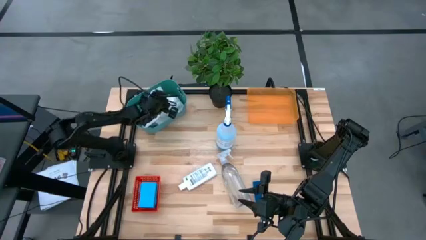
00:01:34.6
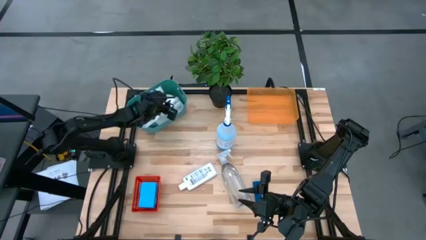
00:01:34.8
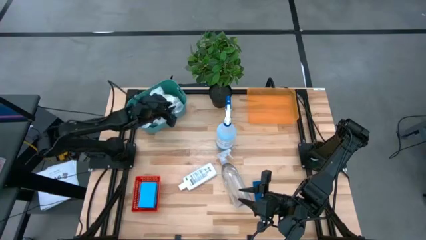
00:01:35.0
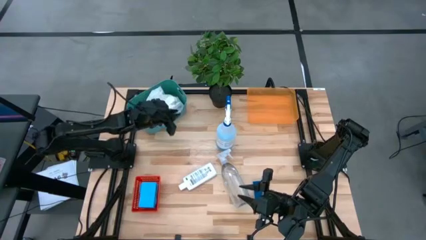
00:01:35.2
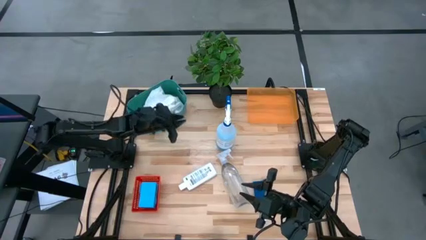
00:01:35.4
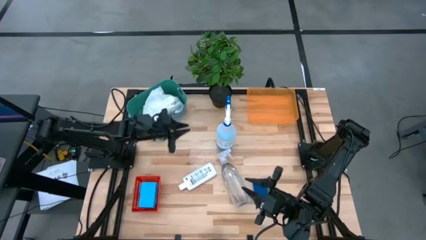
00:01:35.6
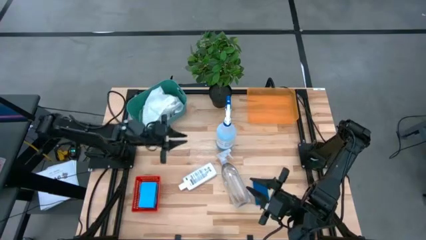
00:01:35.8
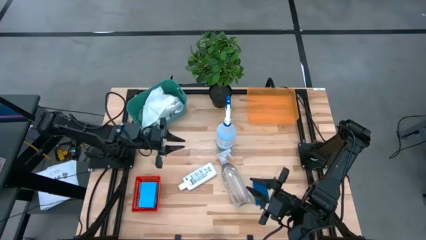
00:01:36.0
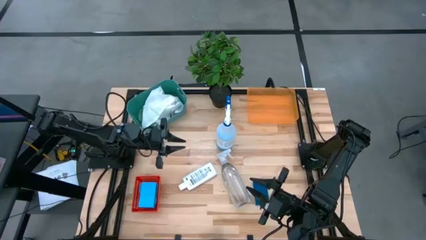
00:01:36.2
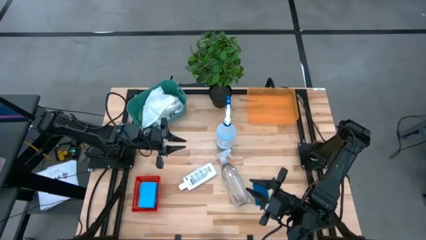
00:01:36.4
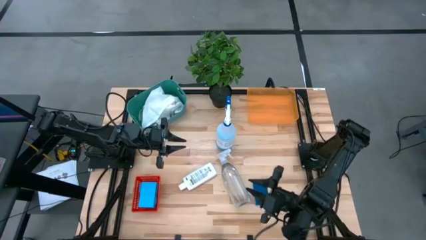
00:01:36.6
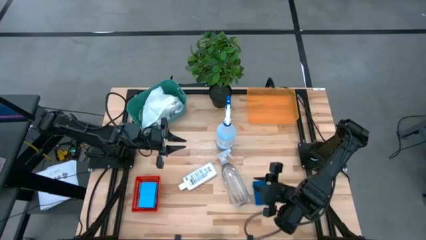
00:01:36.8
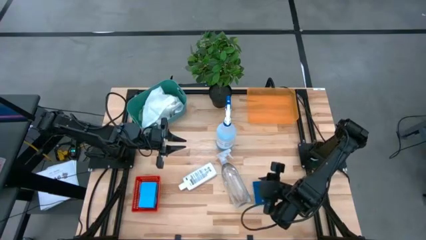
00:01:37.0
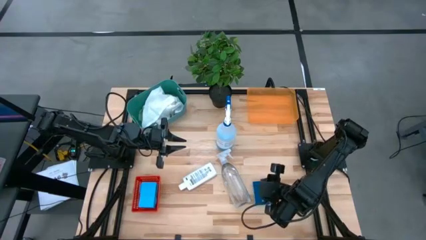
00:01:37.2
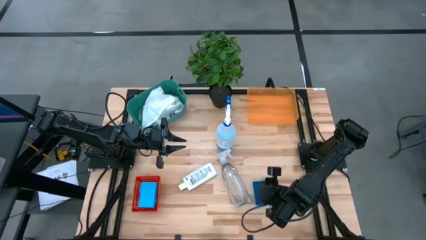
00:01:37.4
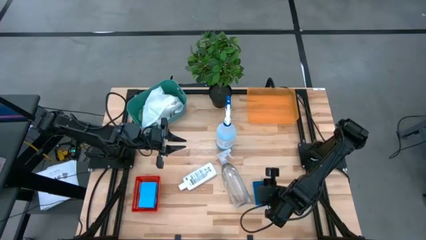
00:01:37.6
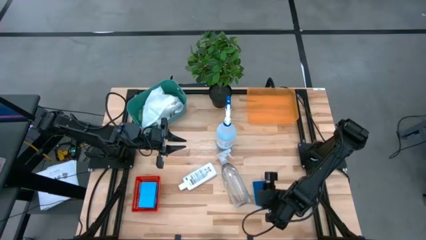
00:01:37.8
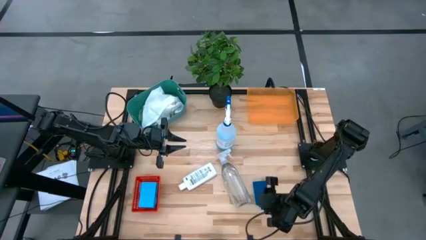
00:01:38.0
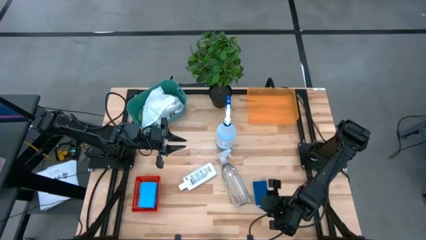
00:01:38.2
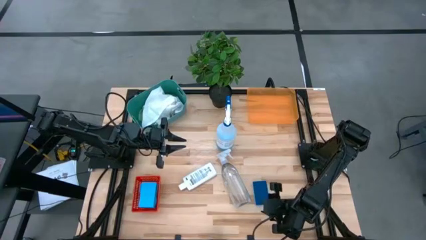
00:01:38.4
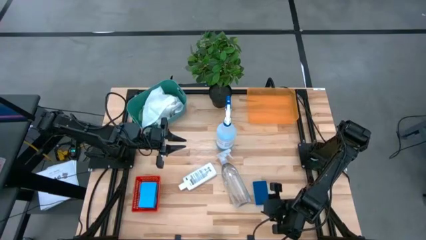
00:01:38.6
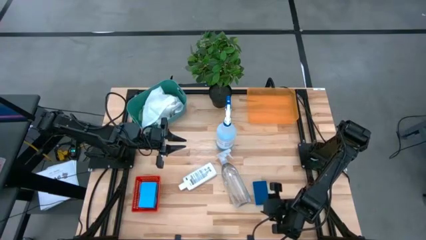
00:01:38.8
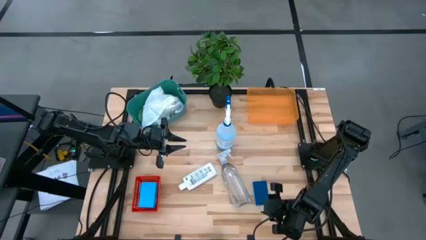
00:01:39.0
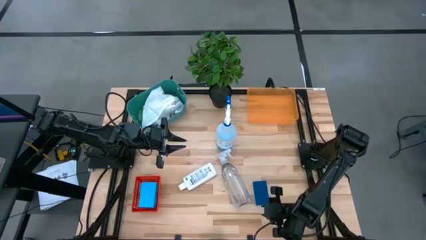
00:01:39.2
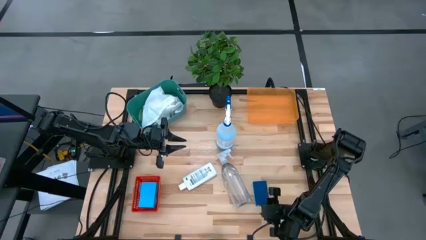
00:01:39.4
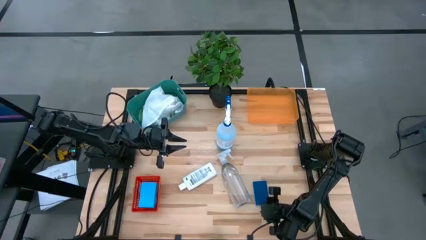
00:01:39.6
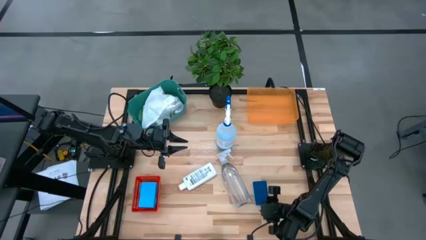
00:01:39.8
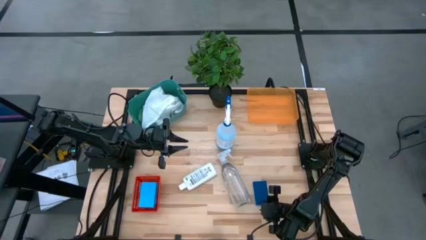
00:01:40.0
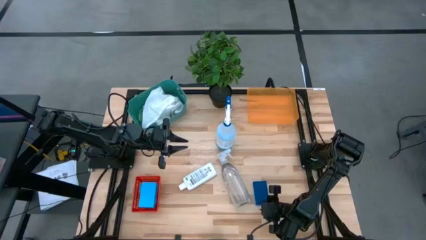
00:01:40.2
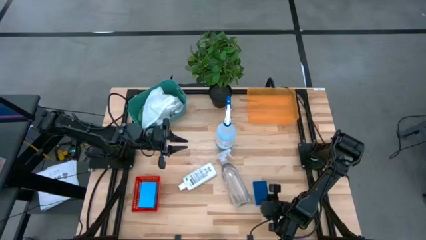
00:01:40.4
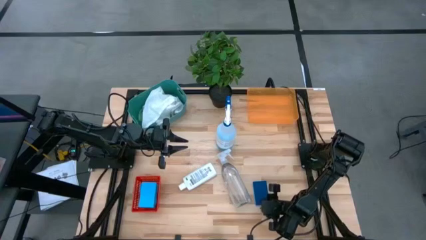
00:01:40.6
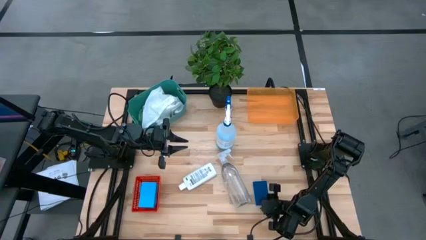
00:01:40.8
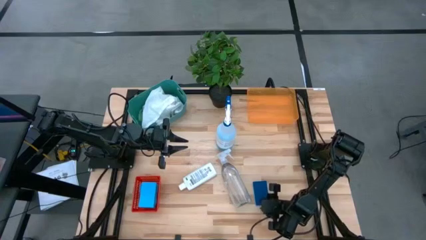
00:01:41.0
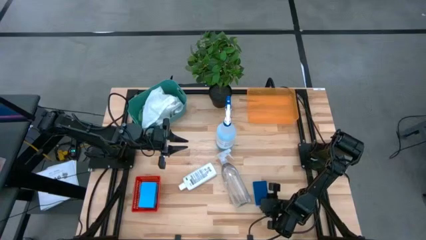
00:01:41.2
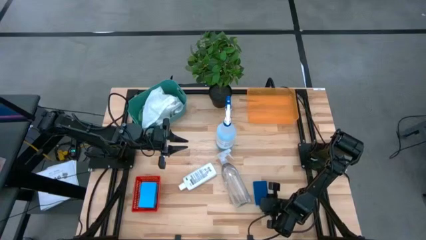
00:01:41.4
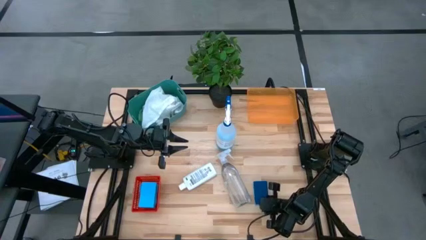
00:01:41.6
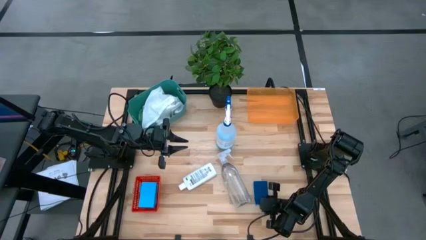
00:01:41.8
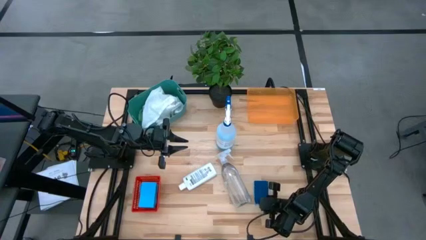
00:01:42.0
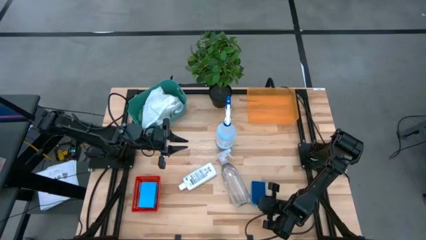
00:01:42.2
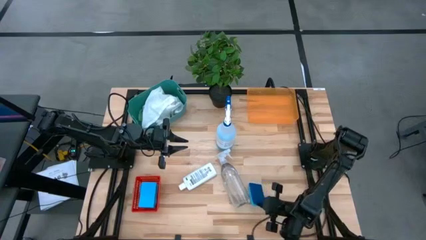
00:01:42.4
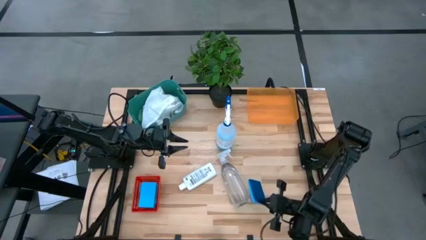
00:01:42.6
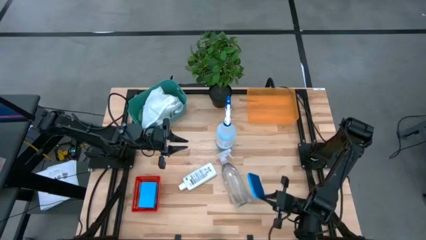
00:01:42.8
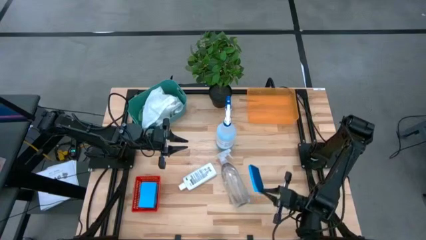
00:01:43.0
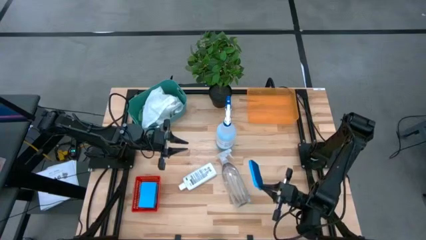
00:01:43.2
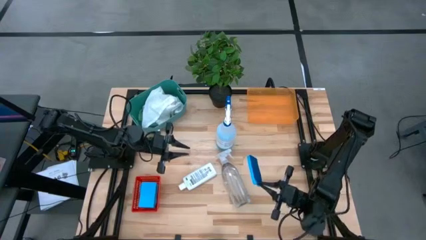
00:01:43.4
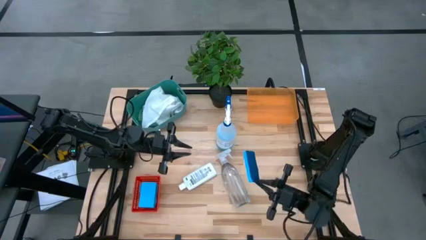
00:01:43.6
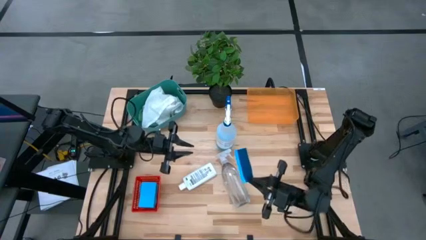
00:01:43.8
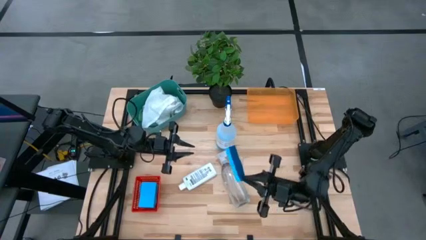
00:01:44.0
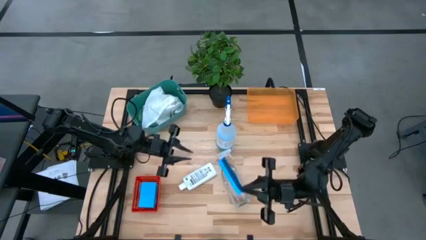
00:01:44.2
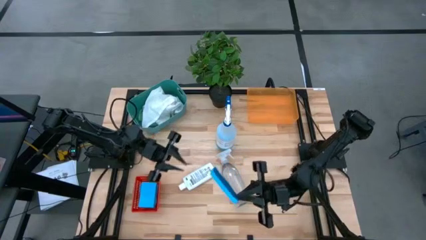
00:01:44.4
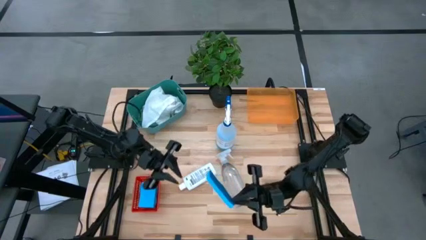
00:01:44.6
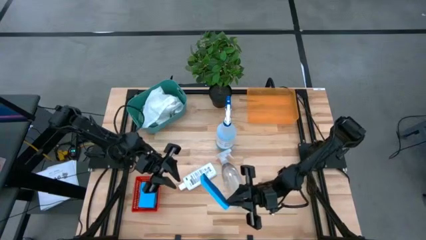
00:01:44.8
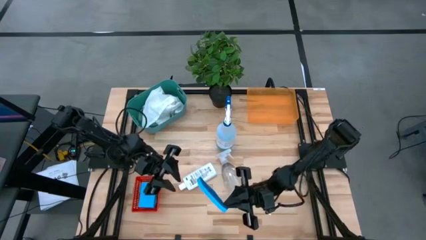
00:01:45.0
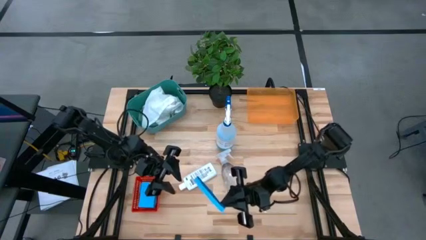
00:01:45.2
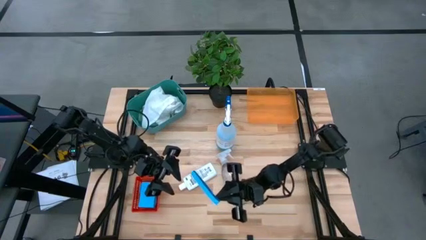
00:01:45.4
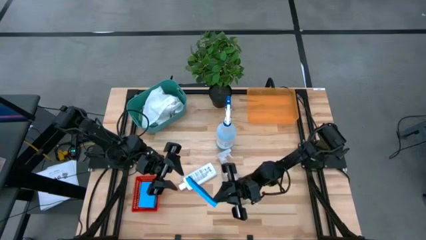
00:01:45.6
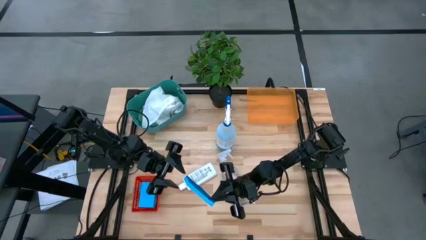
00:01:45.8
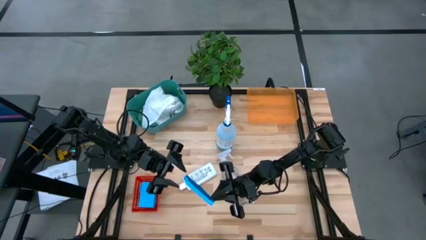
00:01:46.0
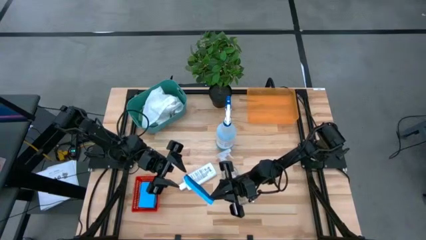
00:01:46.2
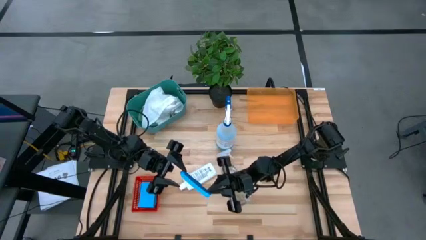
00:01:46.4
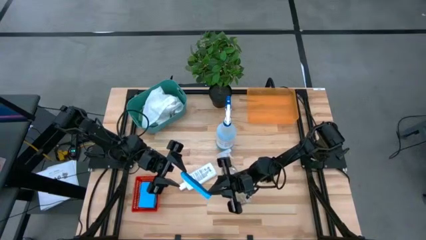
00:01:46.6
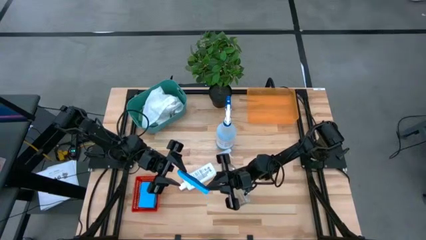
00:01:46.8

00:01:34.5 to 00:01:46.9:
Task: Pick & Place Kitchen Items
Put the blue sponge into the red bin

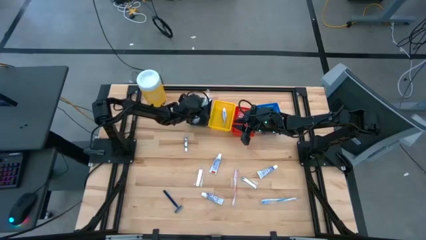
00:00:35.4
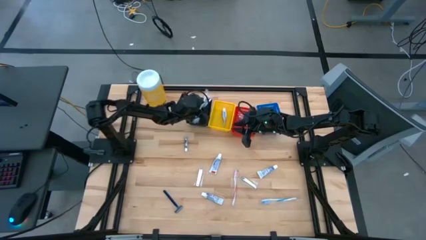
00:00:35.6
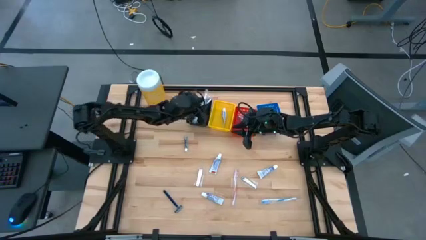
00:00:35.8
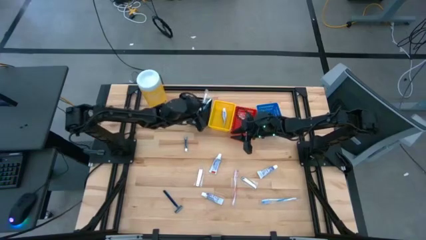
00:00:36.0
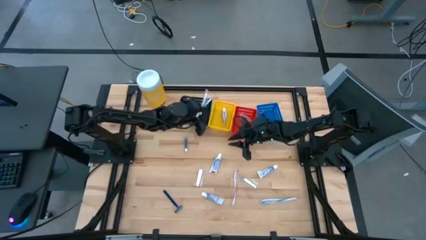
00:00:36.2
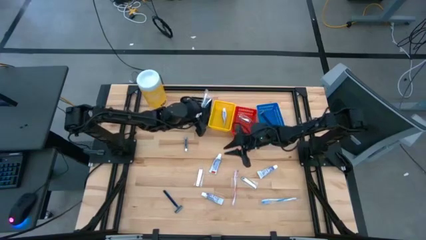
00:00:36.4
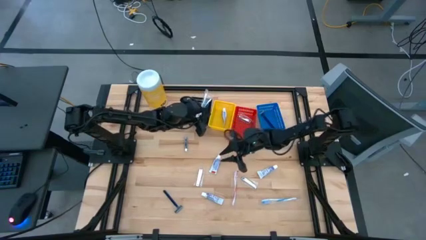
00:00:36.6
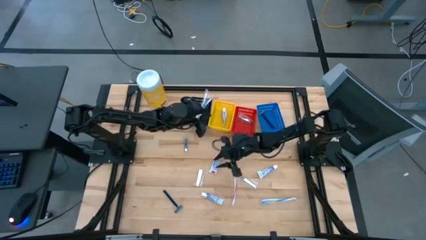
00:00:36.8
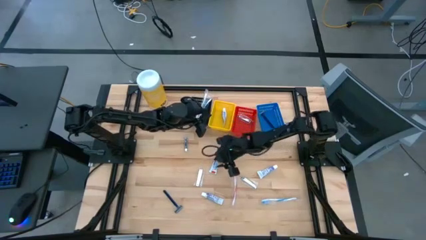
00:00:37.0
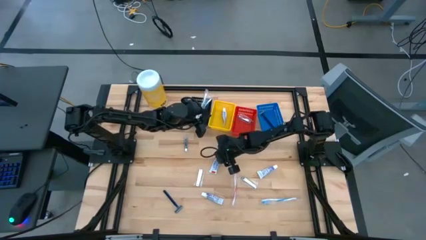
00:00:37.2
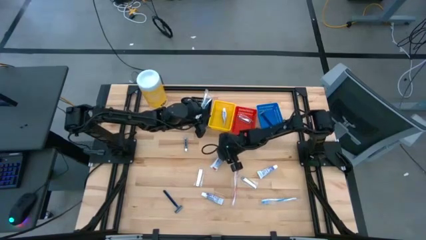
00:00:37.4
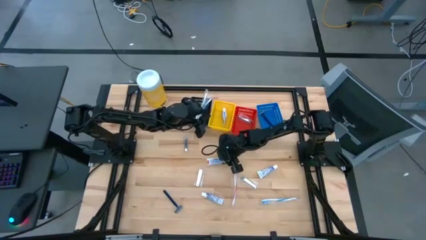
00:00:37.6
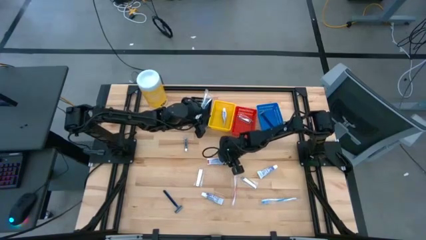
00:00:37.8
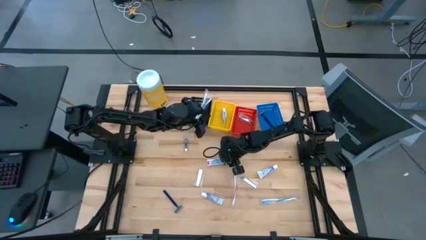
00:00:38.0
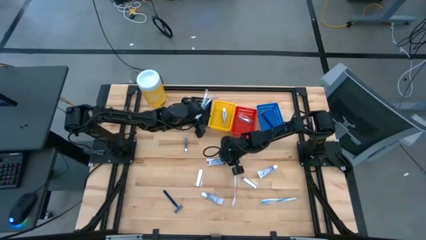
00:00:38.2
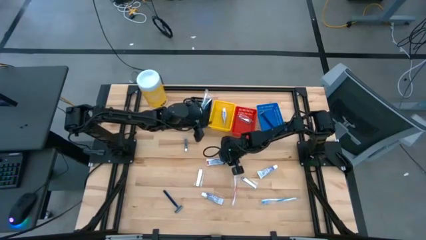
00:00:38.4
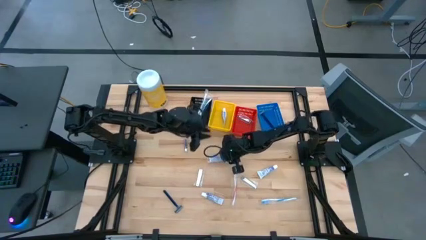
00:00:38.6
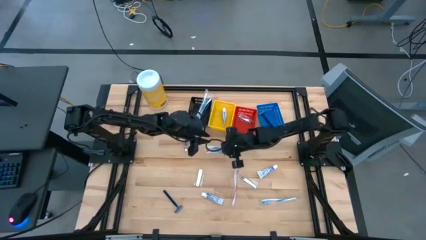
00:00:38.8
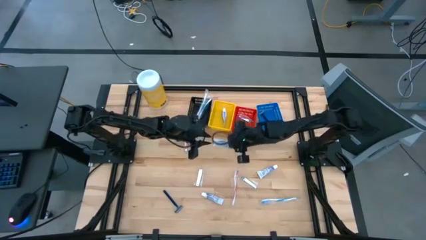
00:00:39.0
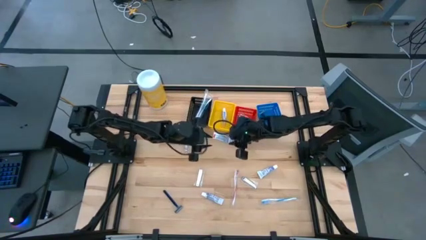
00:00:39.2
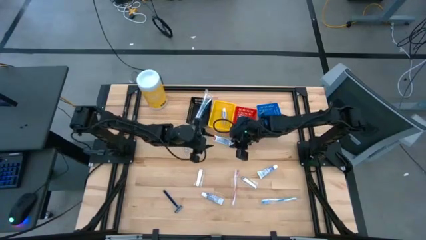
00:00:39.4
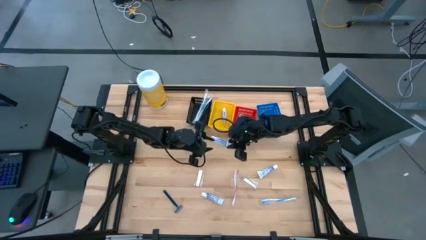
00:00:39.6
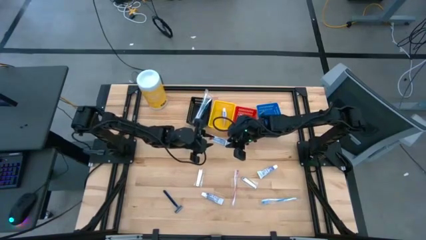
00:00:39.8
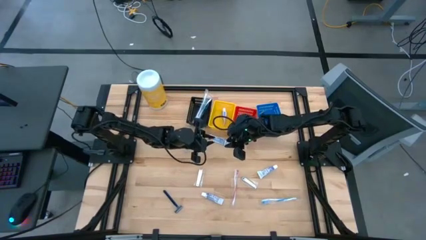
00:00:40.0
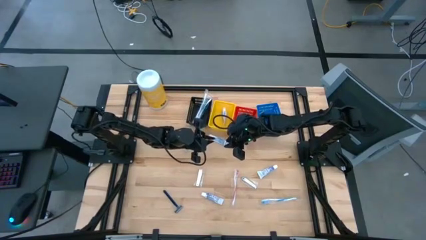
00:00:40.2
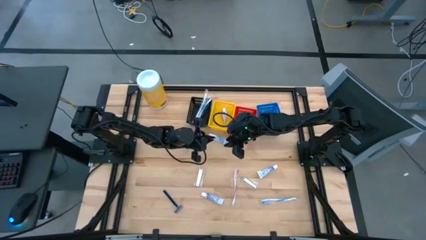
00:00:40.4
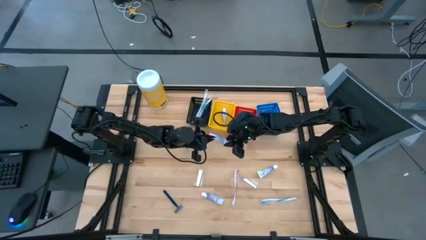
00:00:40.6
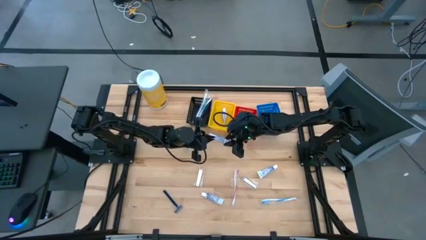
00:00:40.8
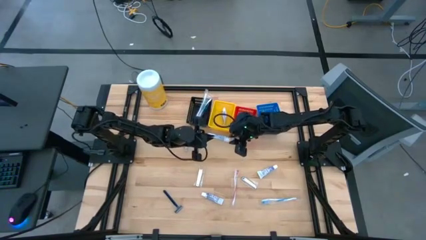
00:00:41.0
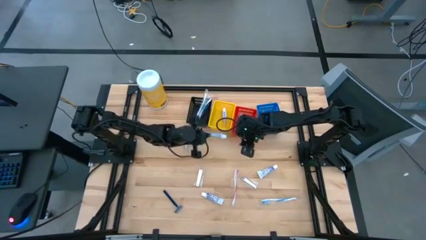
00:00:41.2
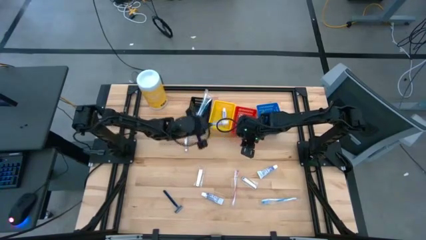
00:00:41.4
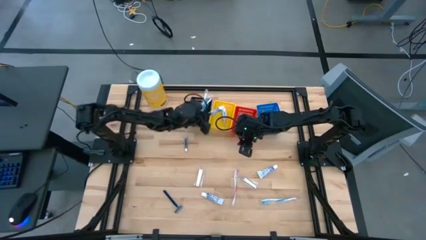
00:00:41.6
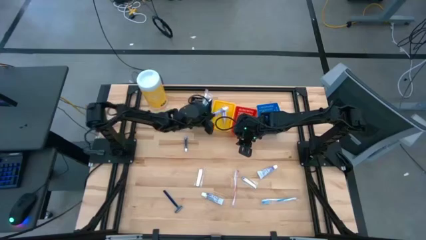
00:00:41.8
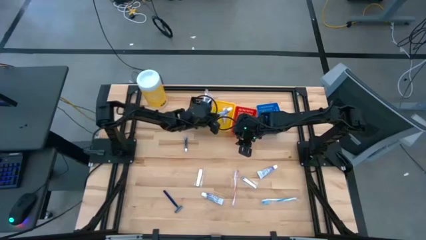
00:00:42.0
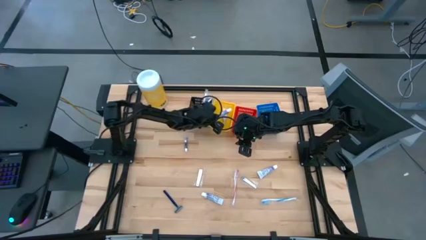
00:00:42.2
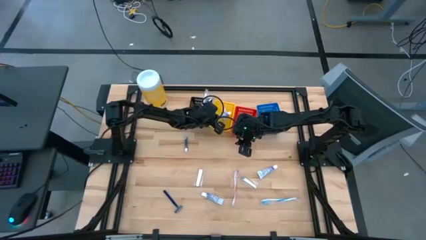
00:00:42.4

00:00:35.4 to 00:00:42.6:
Task: Pick & Place Travel size toiletries
Put the white toothpaste into the yellow bin
